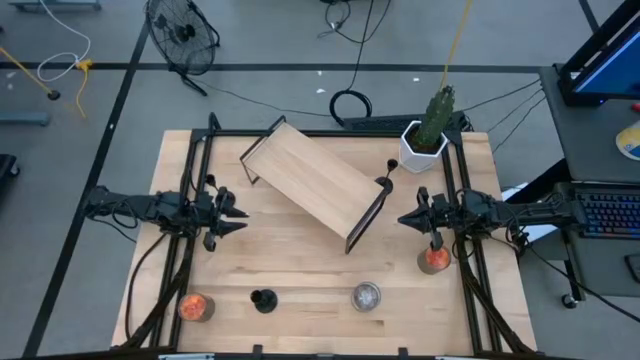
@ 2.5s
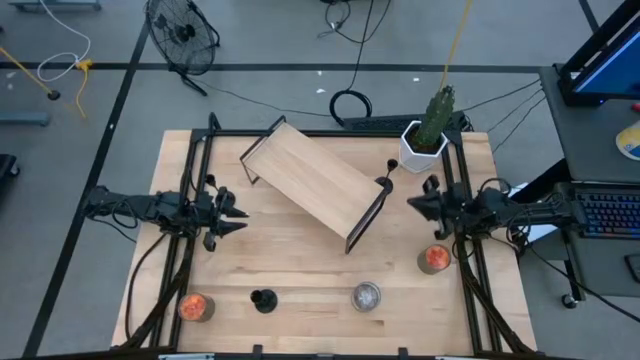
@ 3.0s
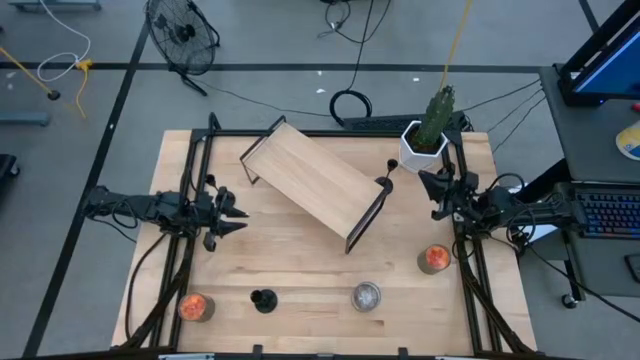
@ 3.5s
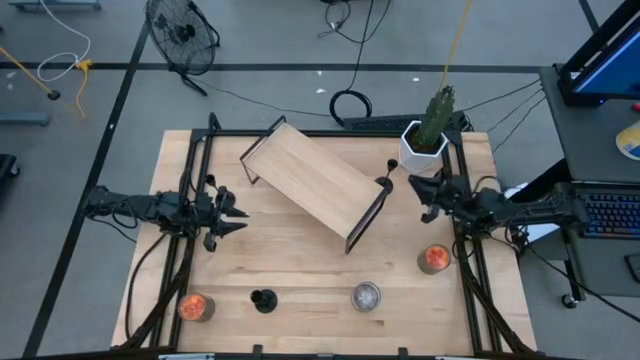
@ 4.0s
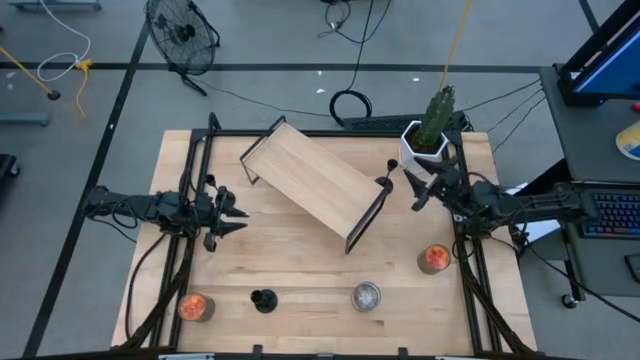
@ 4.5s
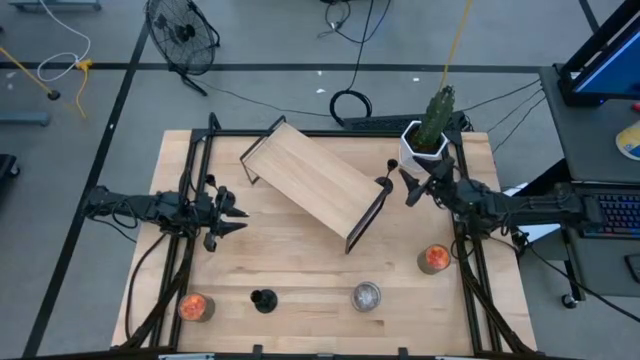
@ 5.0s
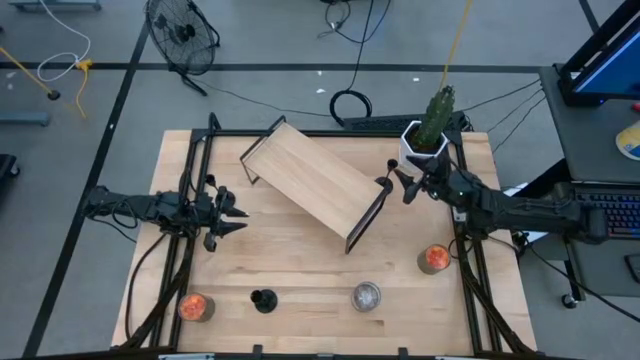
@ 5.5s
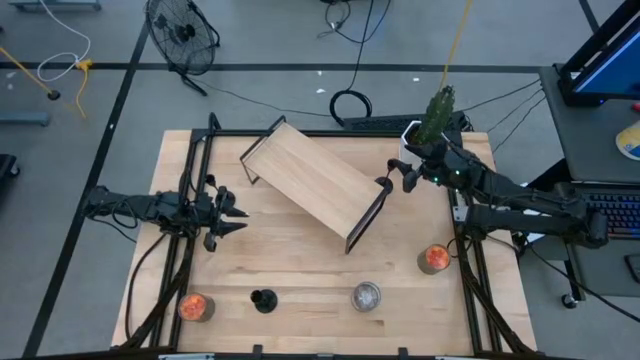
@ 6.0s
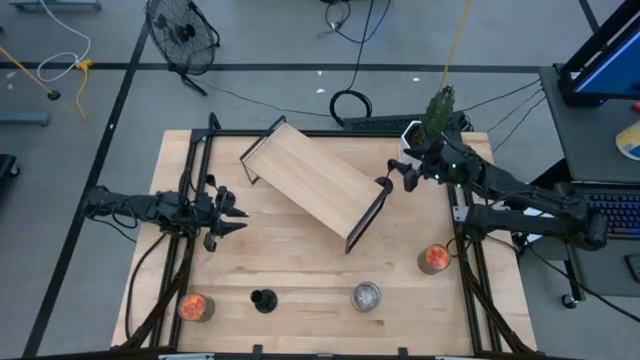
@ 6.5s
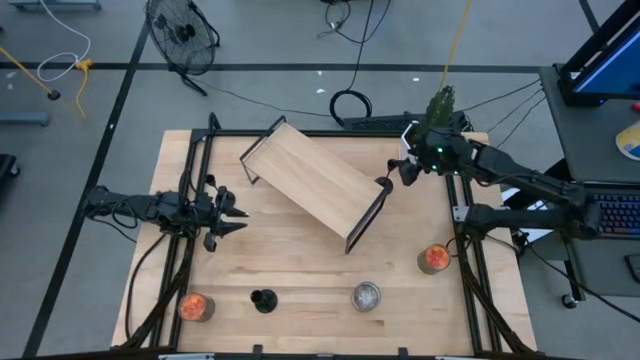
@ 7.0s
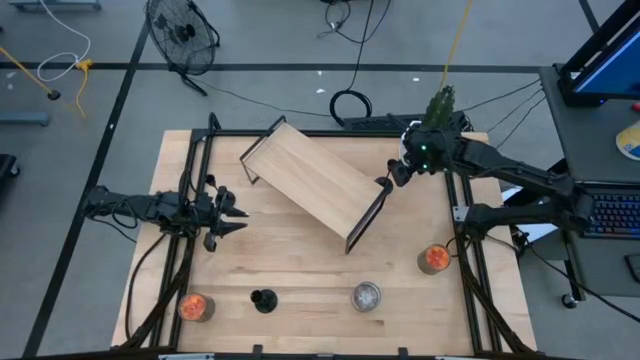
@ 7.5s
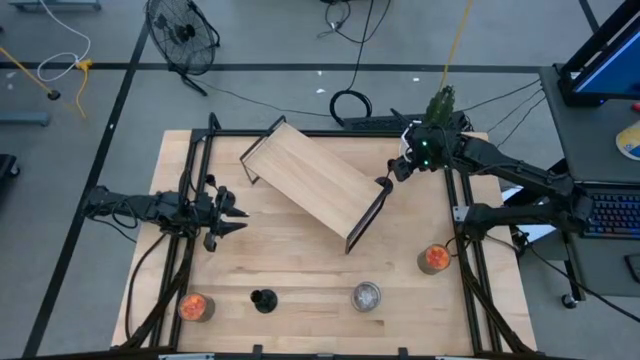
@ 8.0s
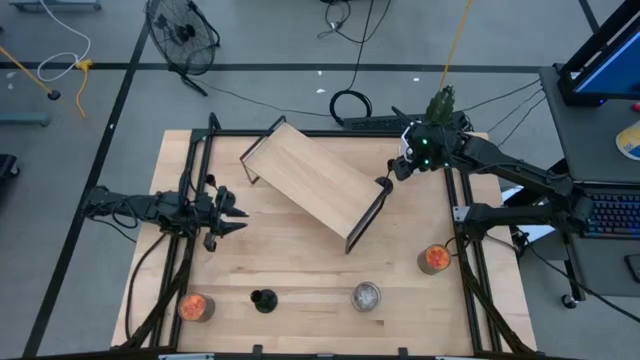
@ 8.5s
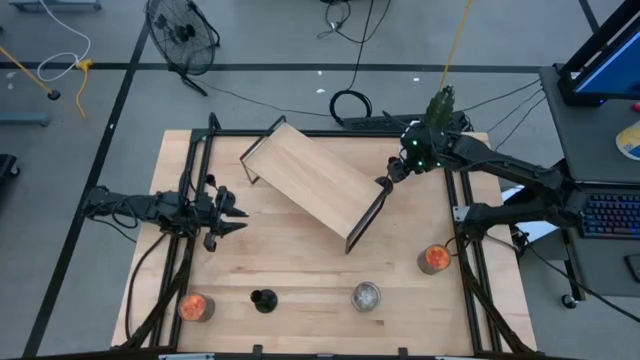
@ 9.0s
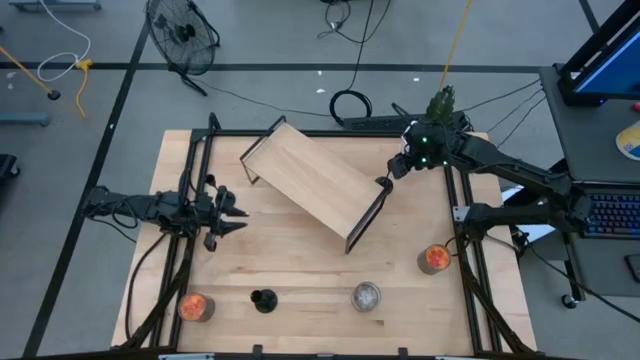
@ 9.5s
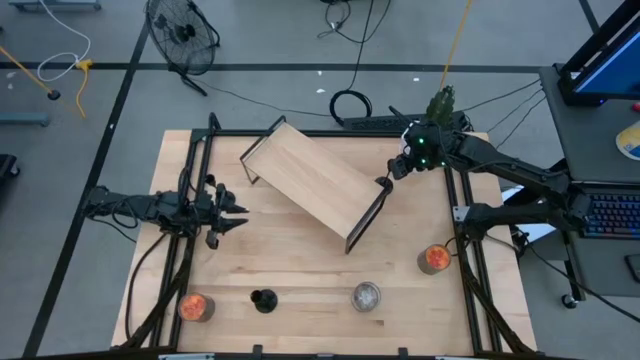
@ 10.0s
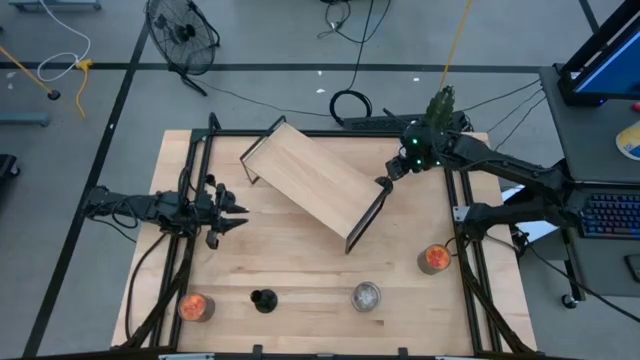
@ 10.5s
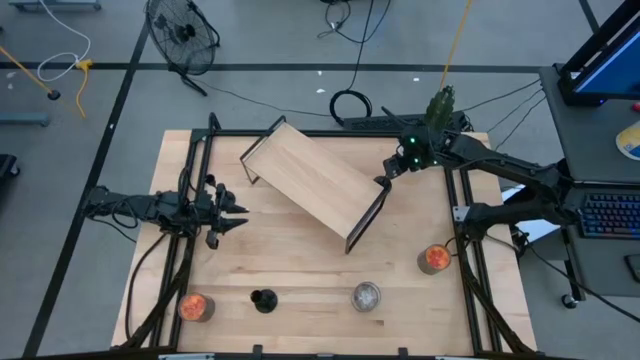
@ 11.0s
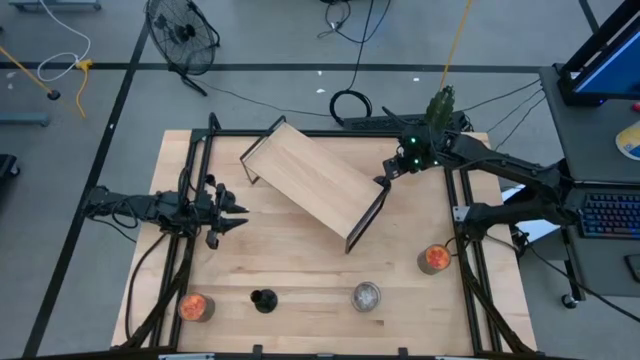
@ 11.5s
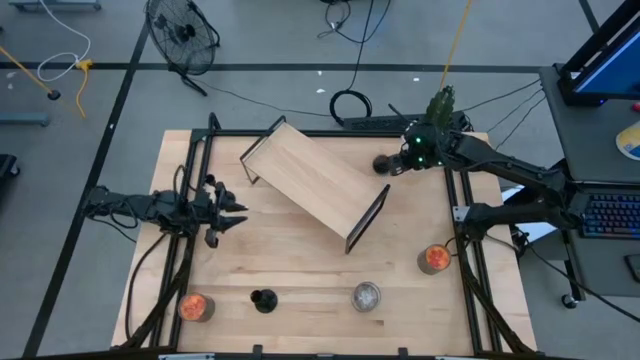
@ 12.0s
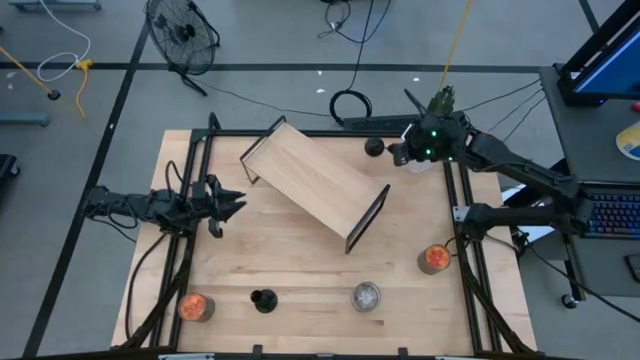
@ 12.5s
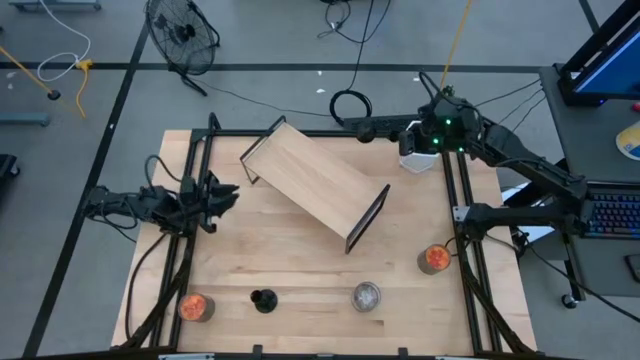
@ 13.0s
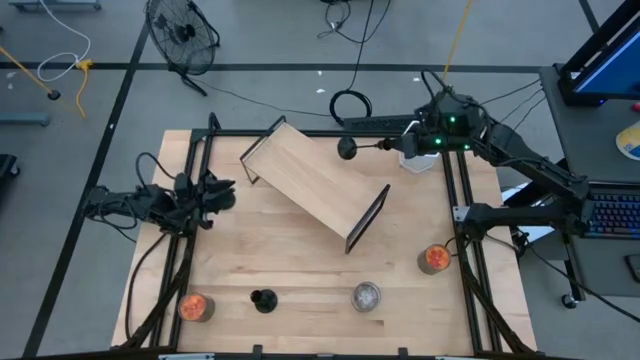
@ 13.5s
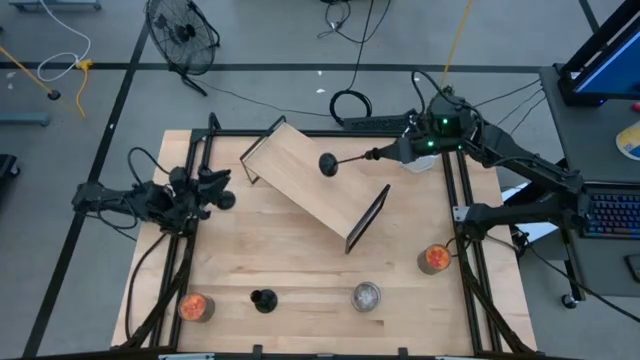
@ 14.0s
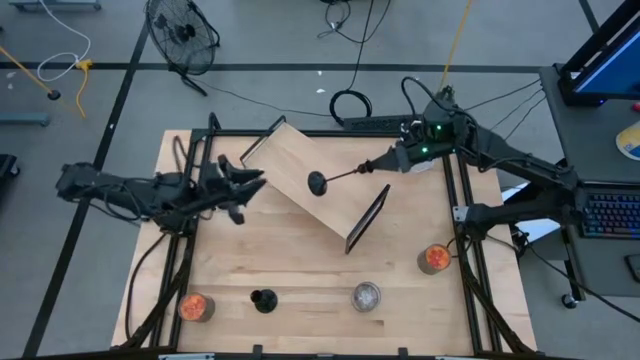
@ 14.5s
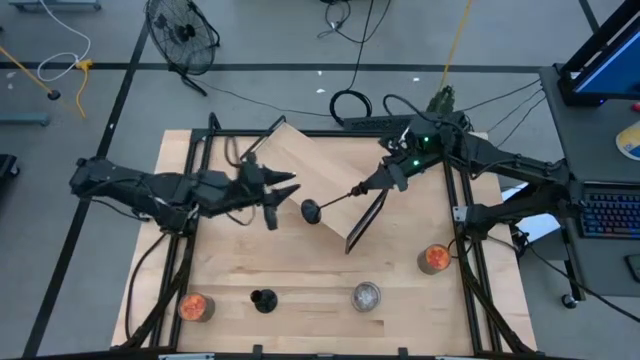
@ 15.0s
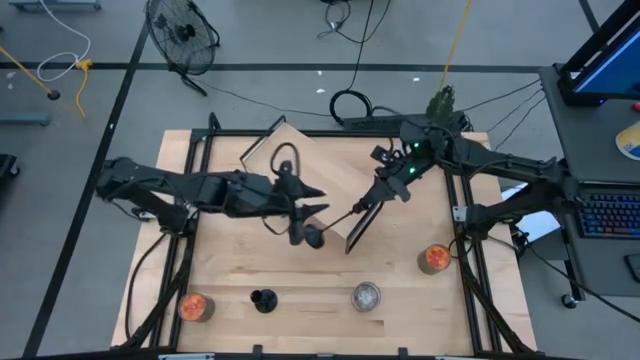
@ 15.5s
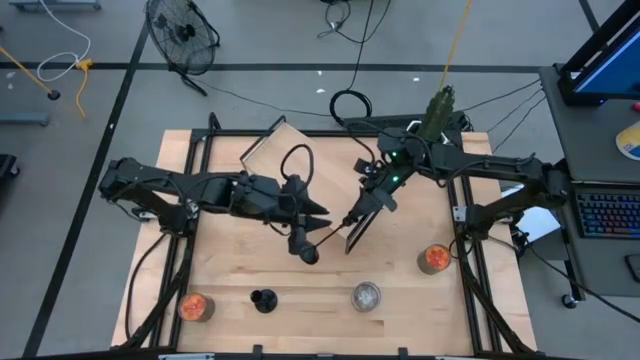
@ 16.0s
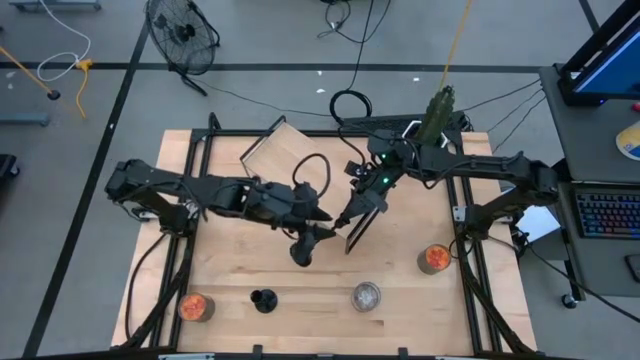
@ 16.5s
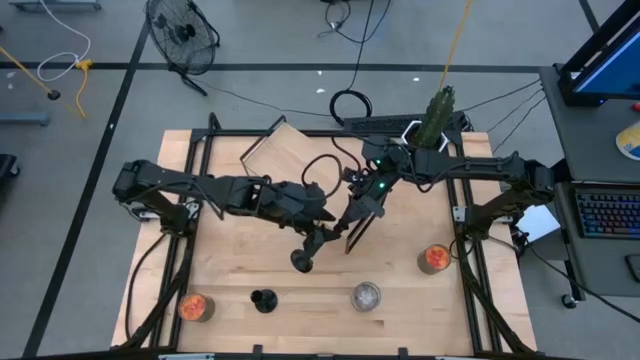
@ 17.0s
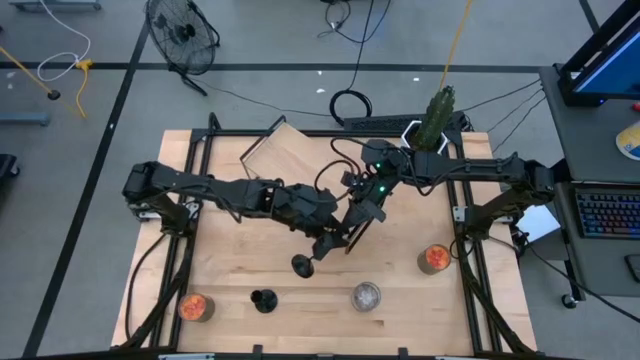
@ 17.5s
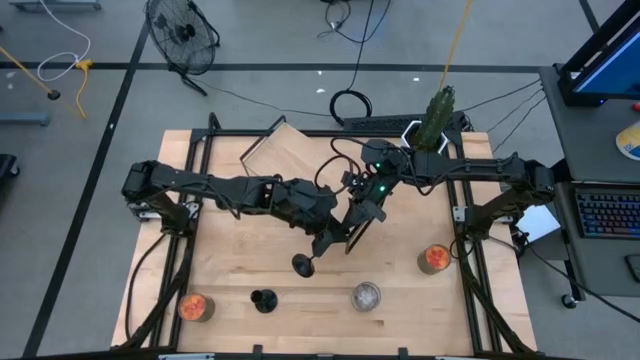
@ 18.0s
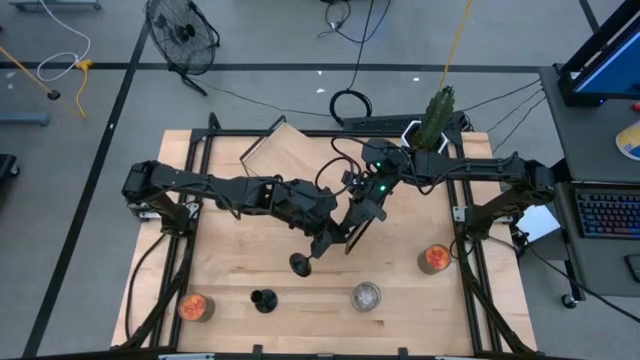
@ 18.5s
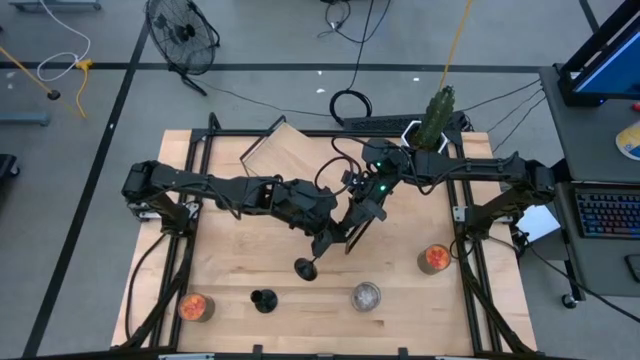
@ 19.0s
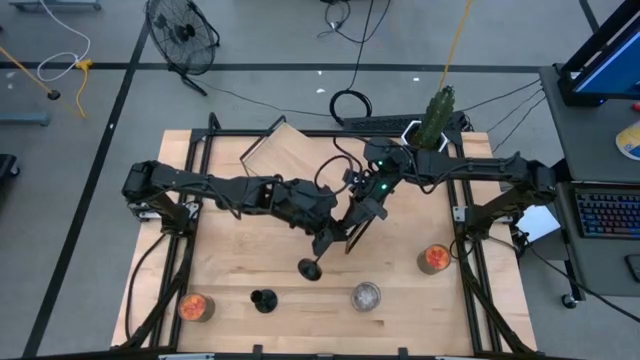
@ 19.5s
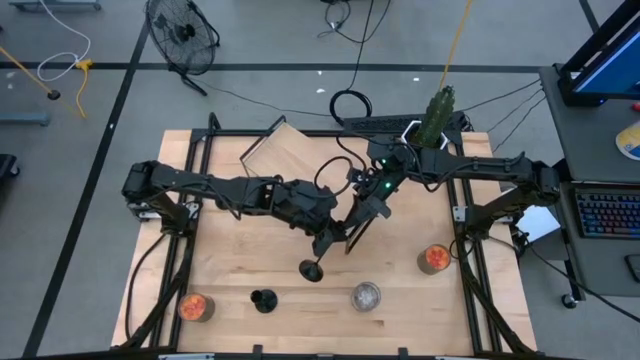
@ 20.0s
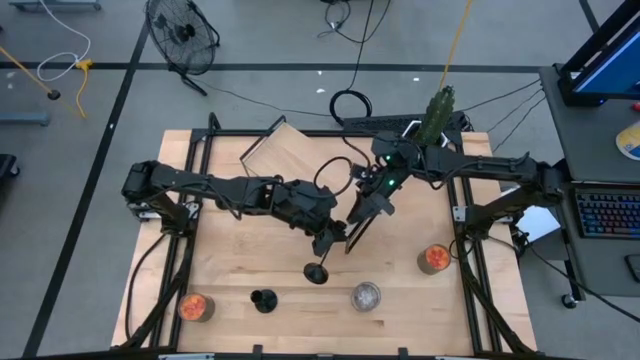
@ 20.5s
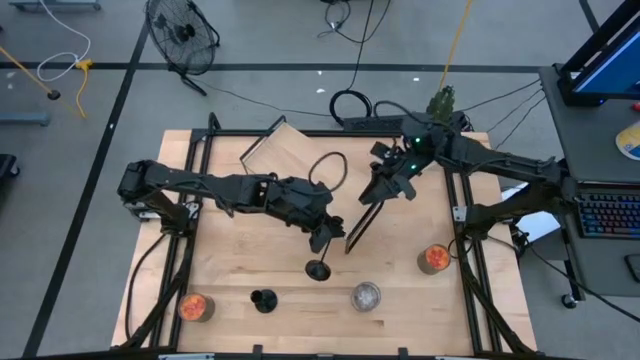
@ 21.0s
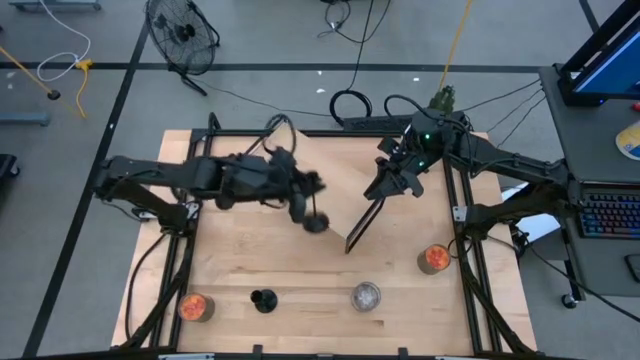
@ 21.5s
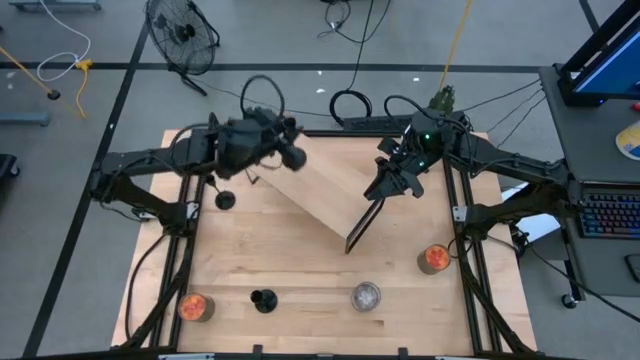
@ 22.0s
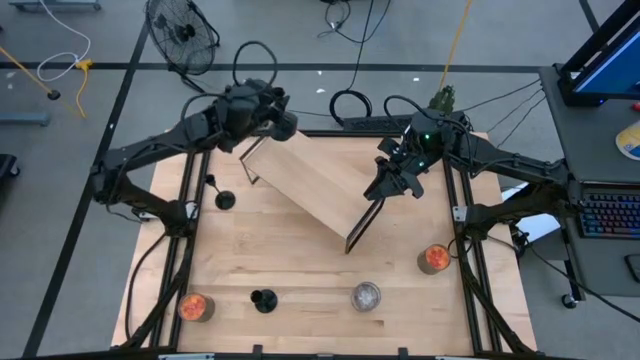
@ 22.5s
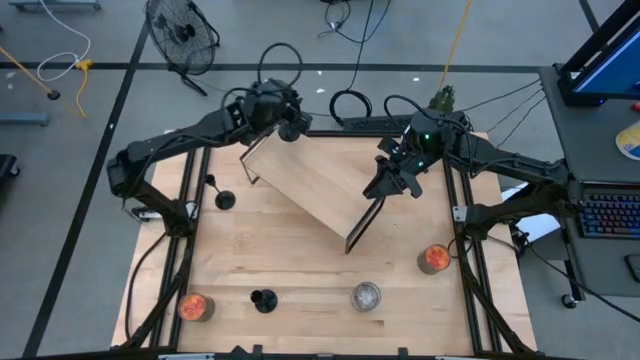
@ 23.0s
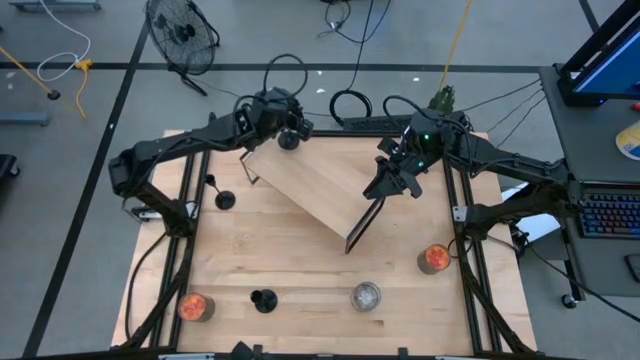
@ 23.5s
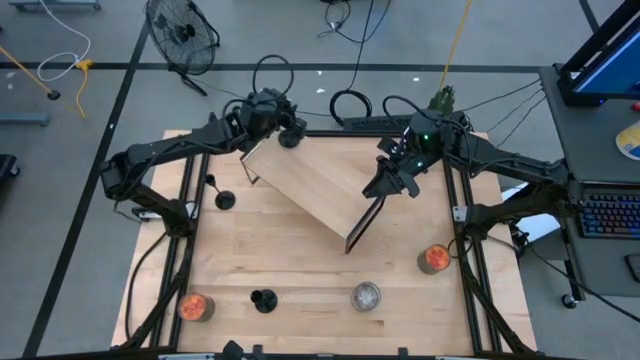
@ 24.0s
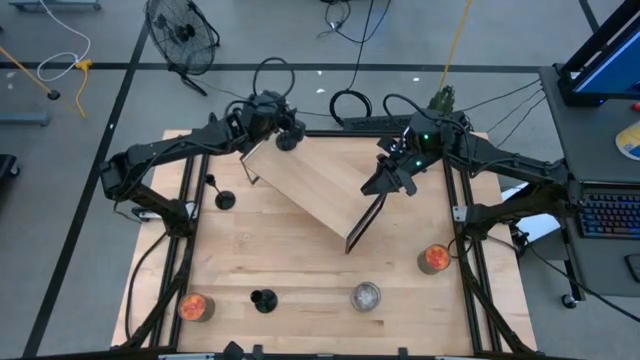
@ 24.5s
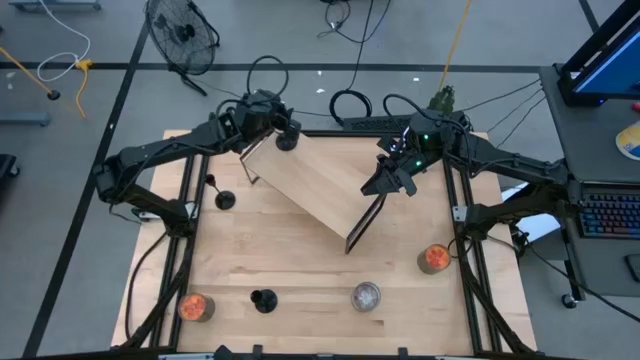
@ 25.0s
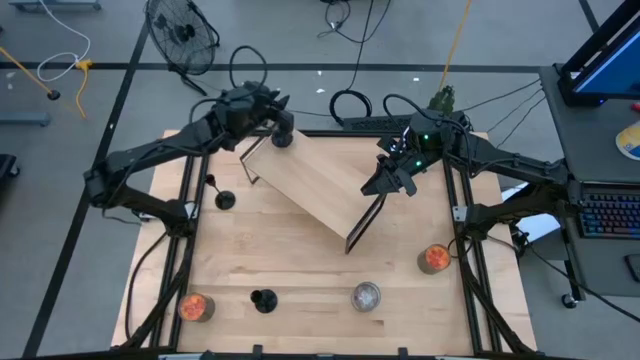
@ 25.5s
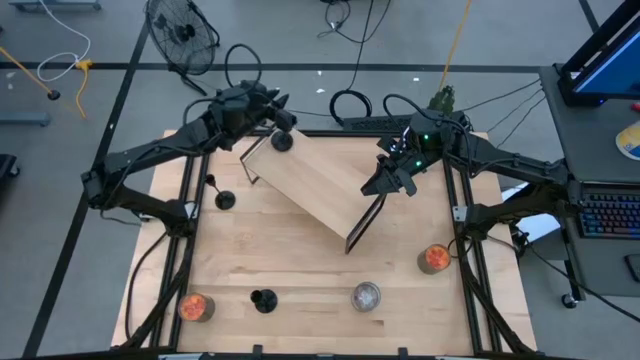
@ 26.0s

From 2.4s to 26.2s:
Task: Pick & Place candle stick holders
Put the top right black candle holder on the shelf
